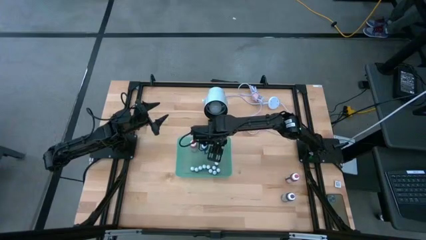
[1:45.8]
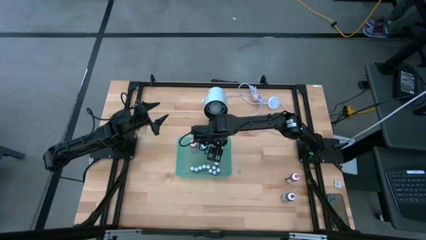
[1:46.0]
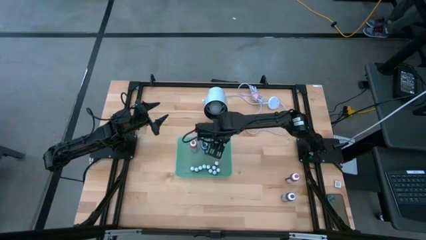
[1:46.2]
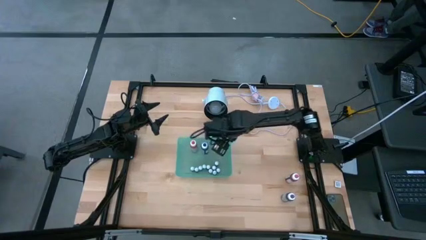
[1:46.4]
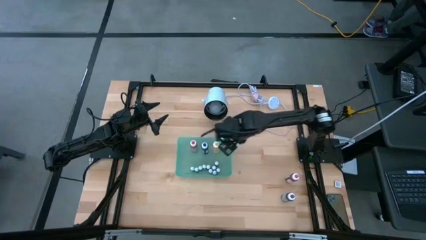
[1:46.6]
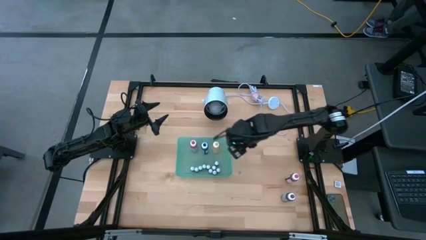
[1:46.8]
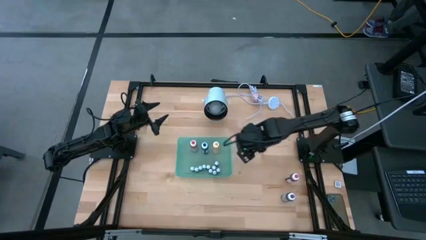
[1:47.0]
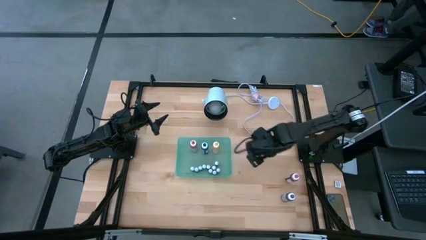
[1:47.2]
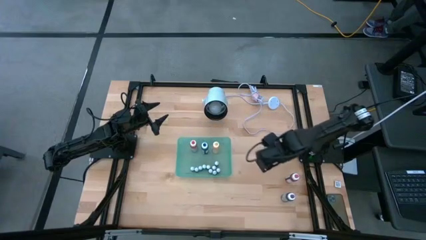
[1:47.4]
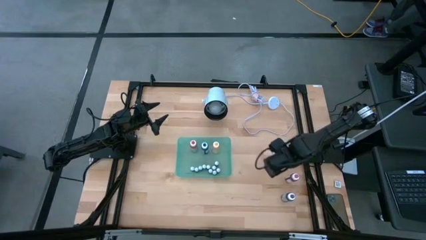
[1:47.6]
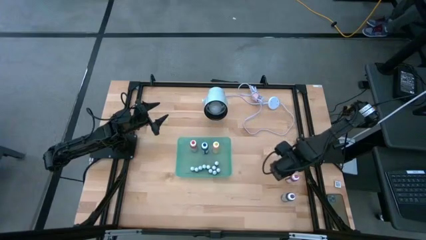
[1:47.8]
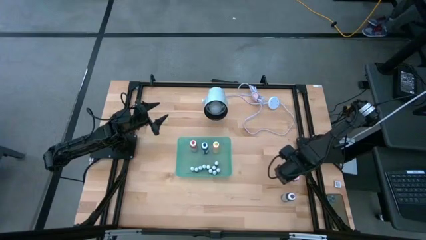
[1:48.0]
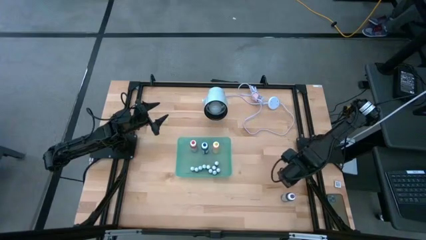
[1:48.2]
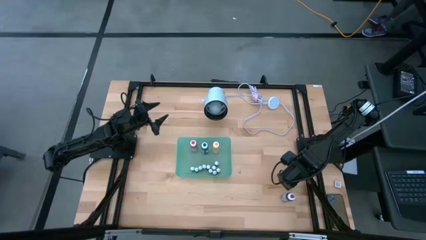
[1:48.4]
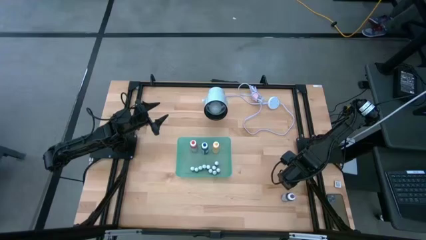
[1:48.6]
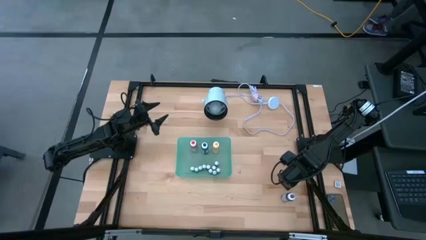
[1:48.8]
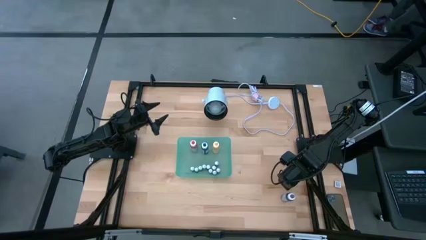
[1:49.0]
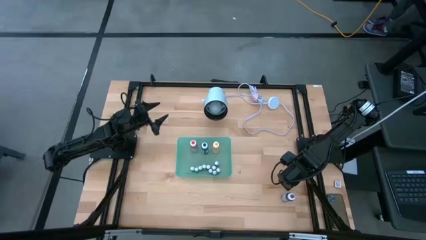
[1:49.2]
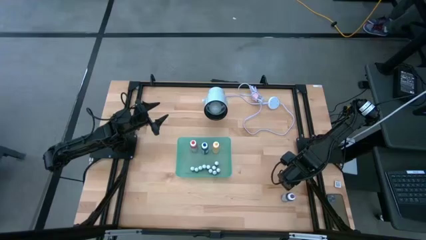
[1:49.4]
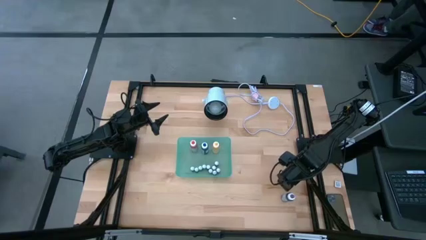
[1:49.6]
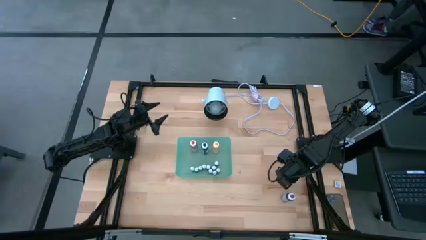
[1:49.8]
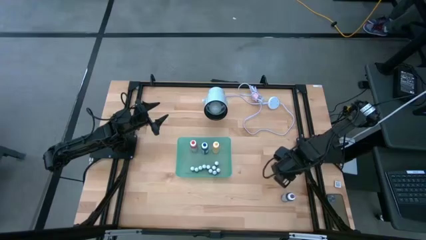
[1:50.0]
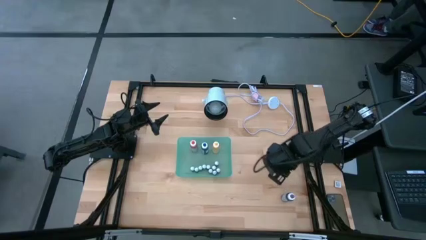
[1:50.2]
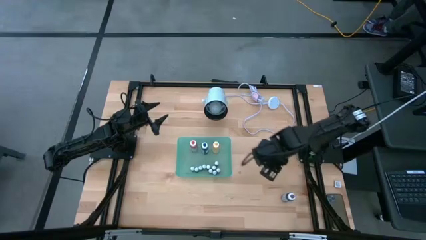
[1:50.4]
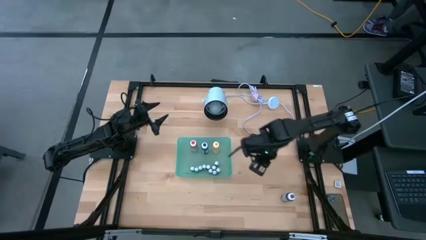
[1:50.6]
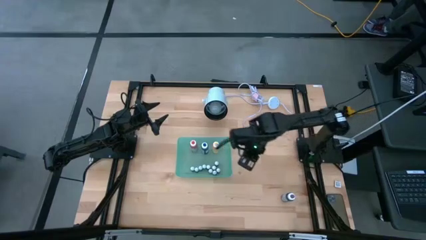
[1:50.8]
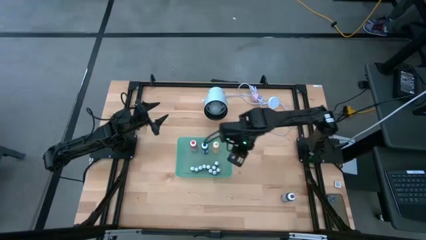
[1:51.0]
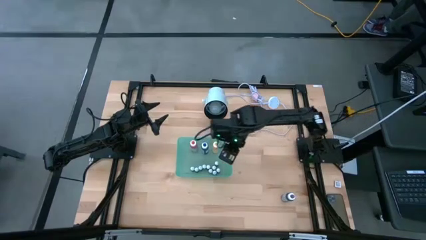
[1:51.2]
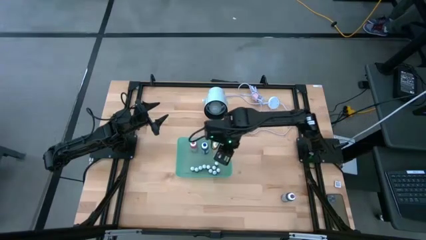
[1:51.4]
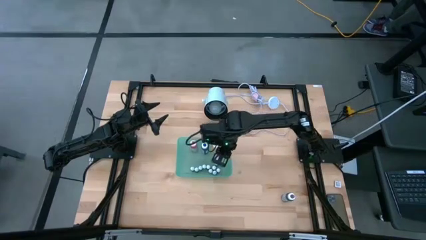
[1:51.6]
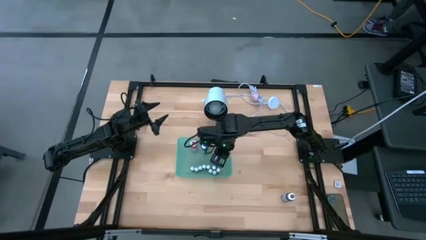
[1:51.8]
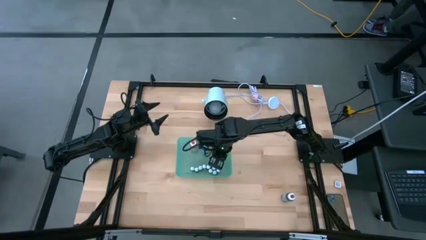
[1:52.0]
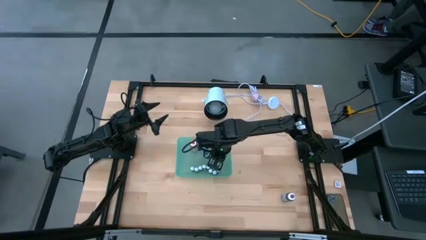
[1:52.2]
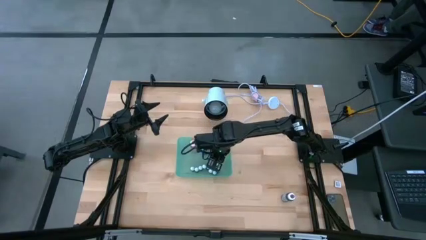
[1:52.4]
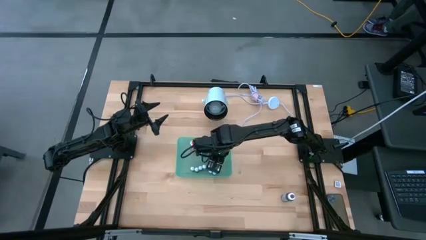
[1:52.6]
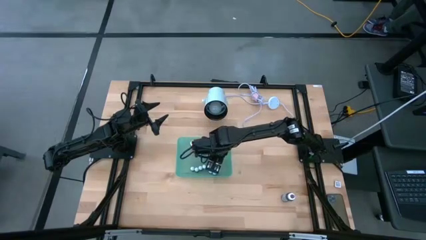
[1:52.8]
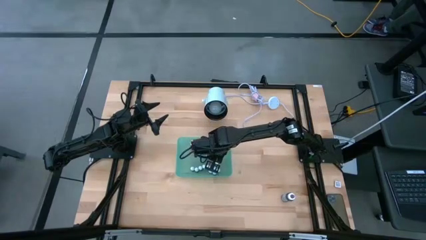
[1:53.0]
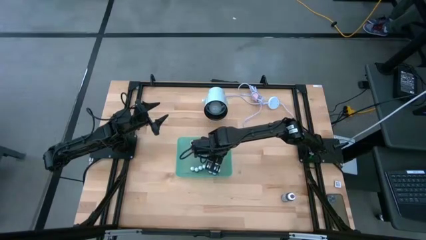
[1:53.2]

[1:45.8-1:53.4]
Task: Pick & Place food coloring
Put the large red food coloring bottle into the bin

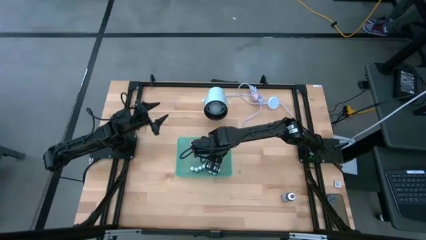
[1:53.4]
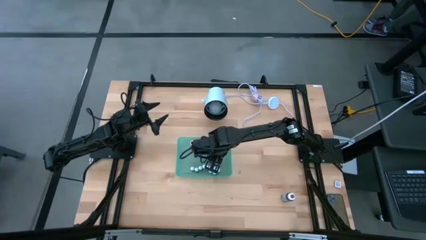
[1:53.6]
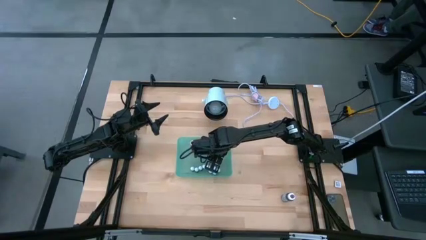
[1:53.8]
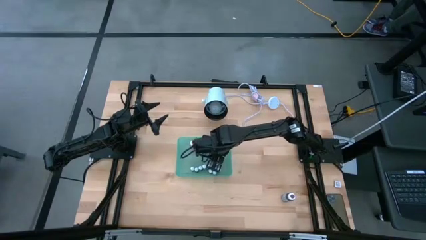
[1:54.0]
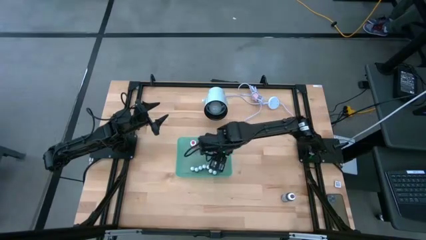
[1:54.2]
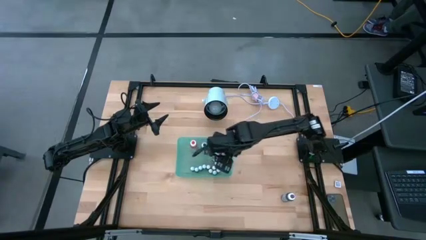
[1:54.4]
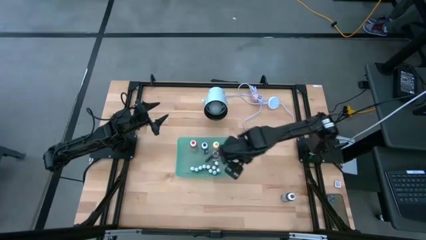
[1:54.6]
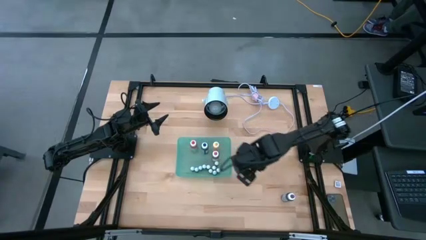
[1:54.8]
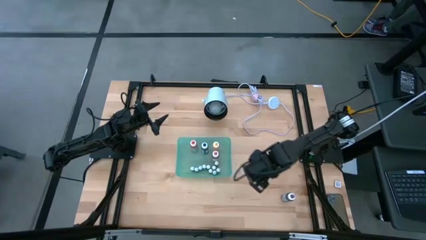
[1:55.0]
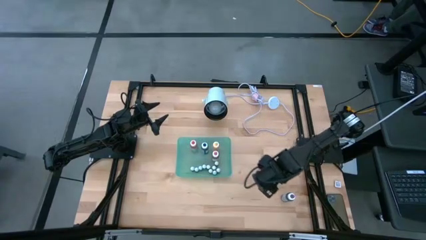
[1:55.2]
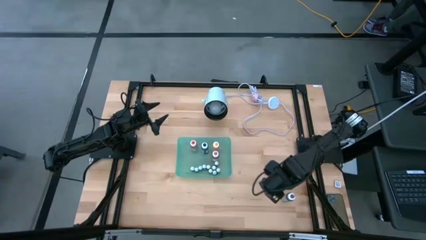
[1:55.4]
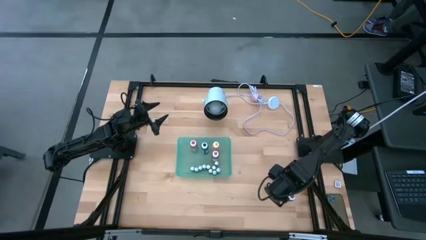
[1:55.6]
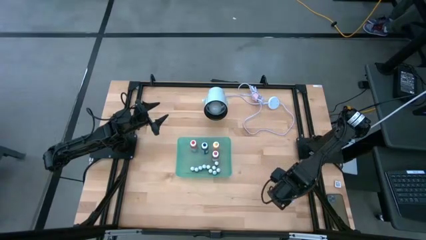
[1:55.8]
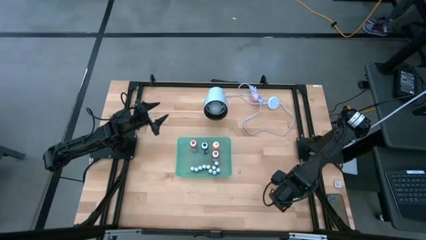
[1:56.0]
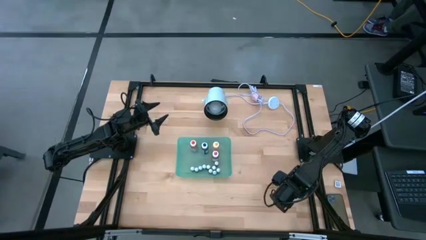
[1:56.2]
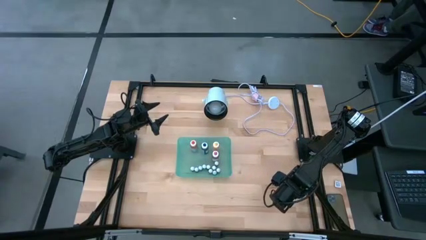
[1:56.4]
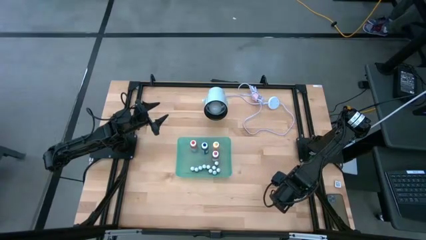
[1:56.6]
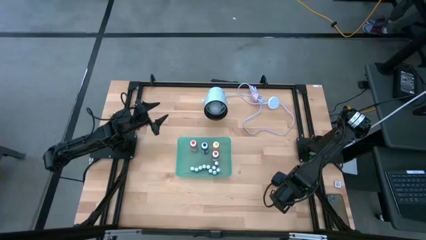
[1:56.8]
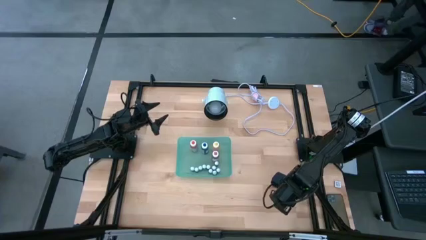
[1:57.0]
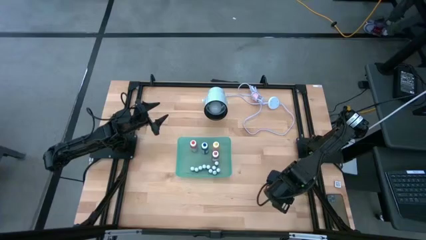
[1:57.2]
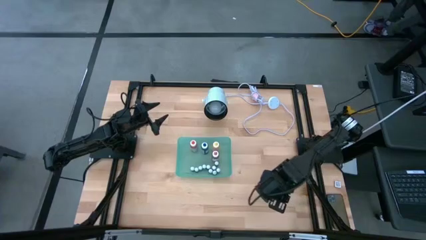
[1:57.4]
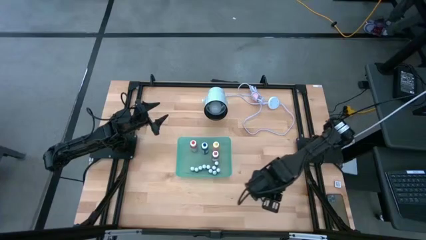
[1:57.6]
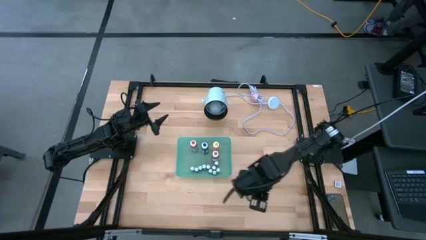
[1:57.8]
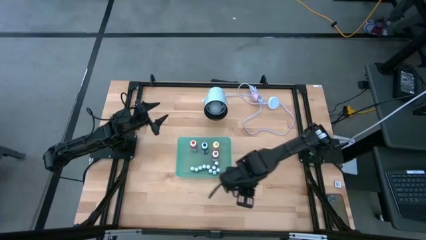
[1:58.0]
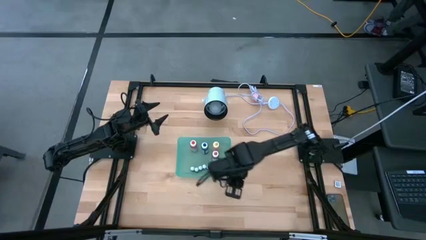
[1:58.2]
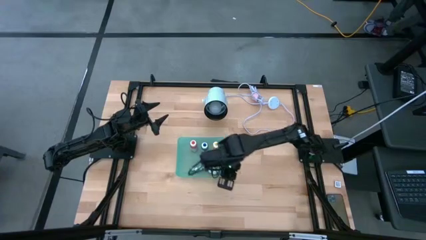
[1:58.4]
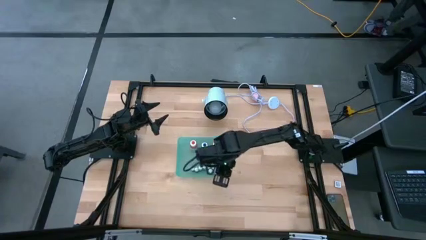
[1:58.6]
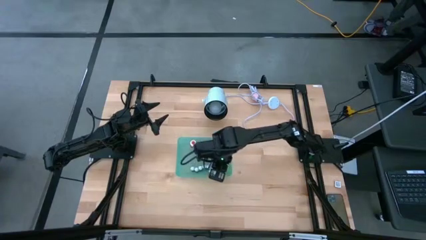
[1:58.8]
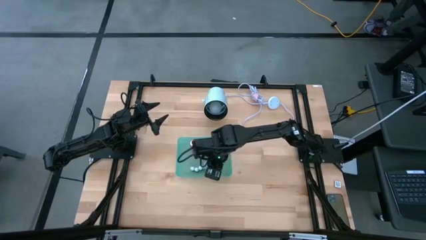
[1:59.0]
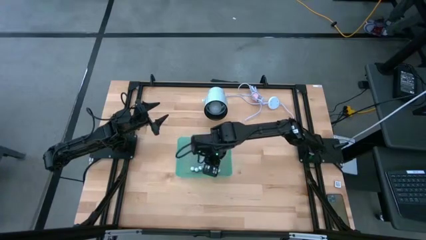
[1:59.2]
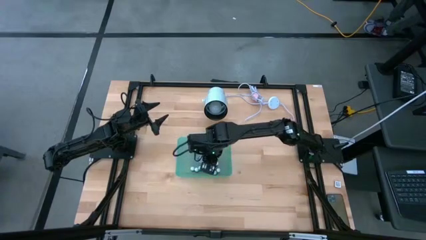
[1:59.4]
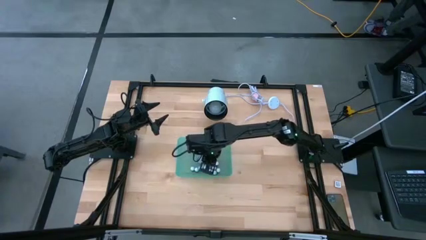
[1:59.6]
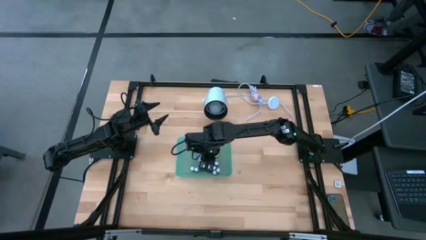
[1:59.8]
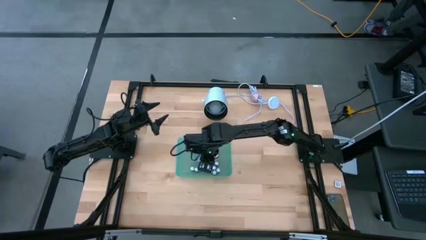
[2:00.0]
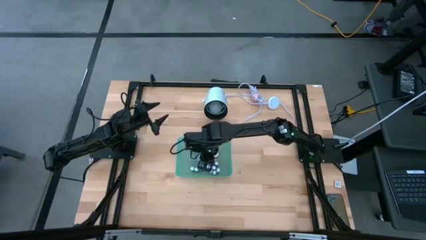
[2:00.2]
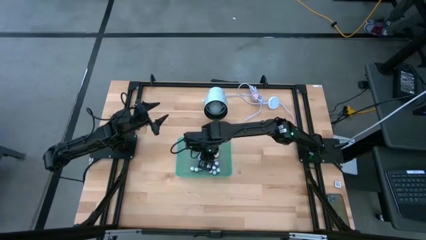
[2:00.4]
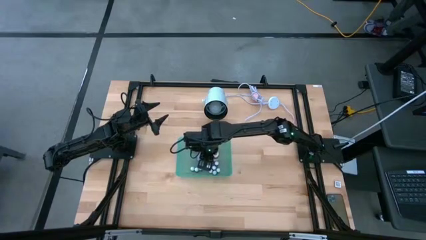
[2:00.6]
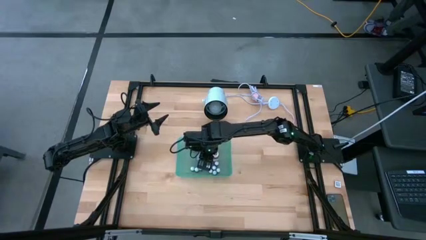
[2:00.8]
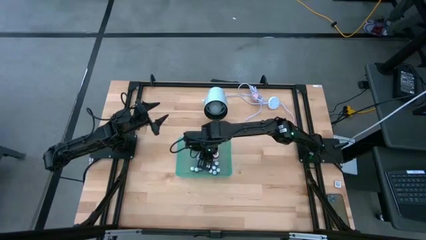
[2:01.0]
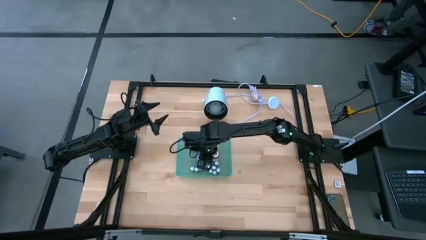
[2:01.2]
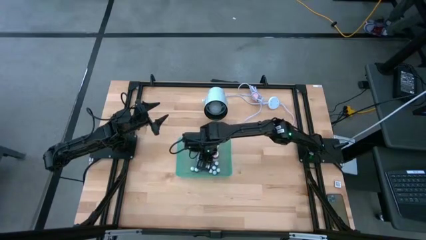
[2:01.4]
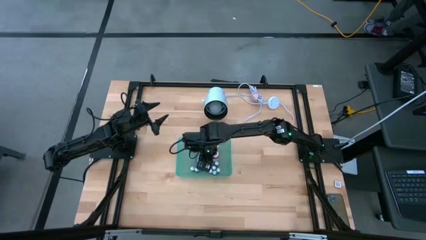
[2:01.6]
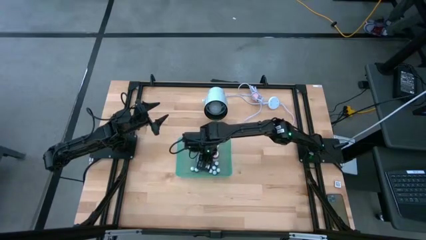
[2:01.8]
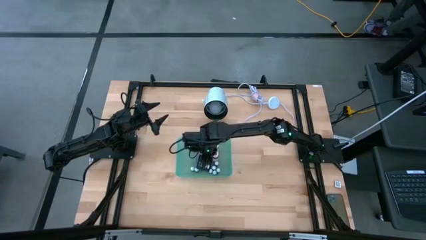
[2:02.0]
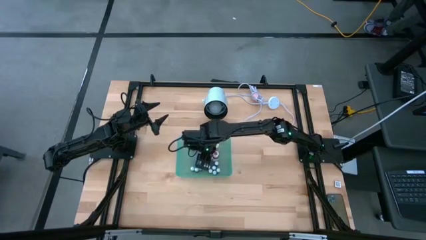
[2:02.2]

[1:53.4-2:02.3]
Put the large purple food coloring bottle into the bin
